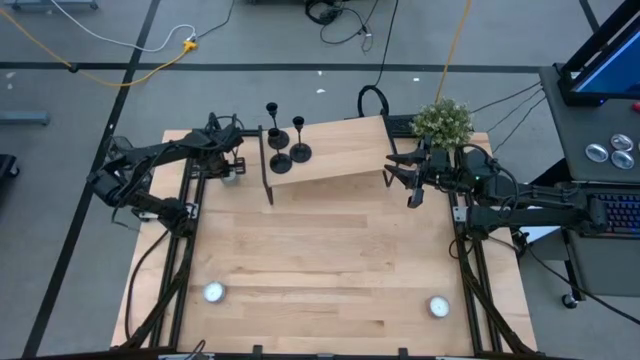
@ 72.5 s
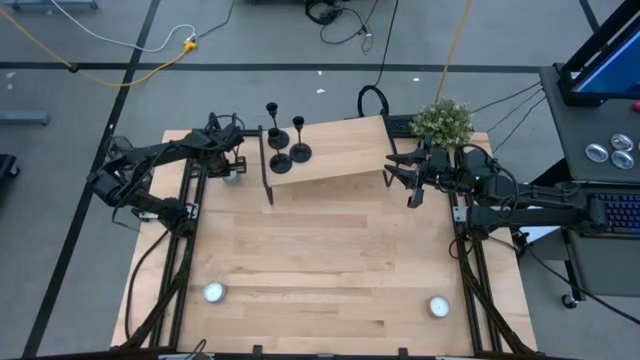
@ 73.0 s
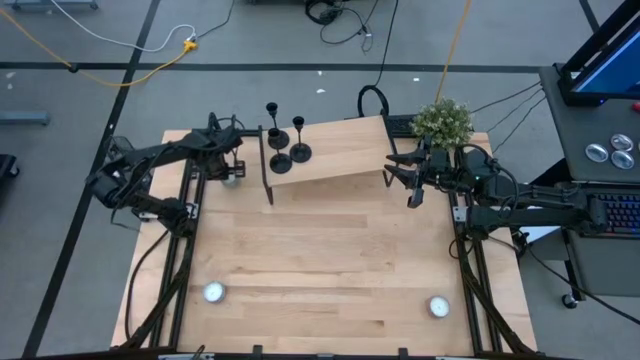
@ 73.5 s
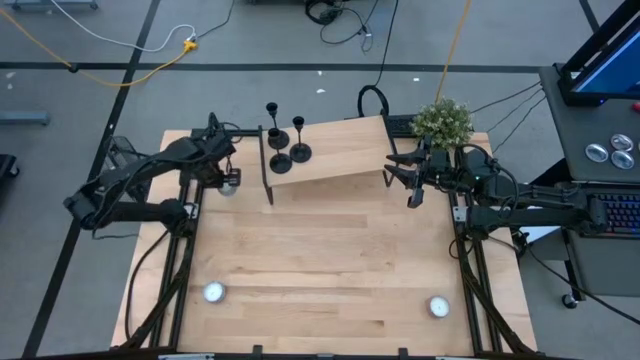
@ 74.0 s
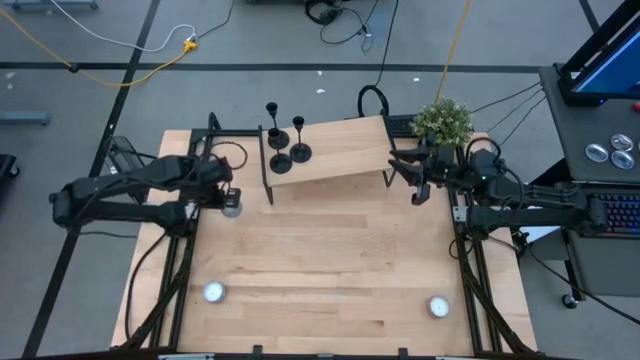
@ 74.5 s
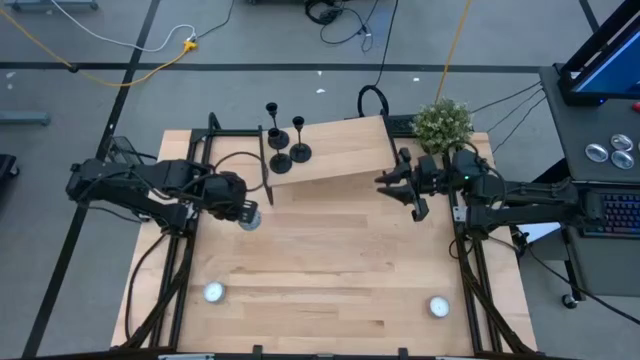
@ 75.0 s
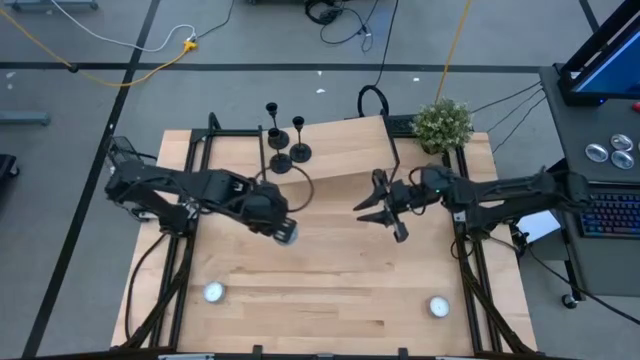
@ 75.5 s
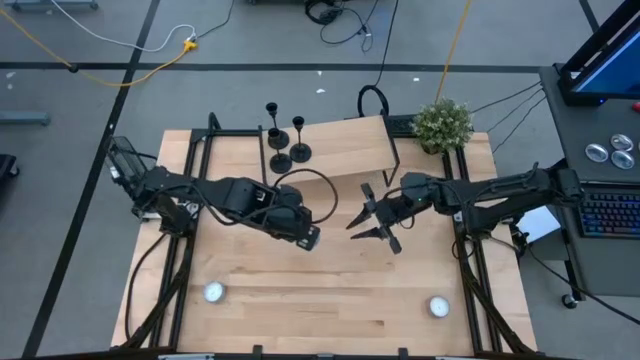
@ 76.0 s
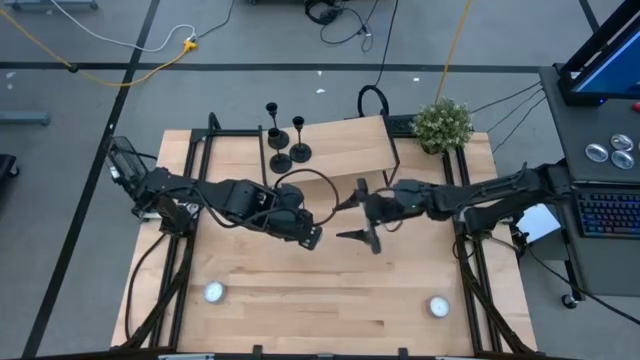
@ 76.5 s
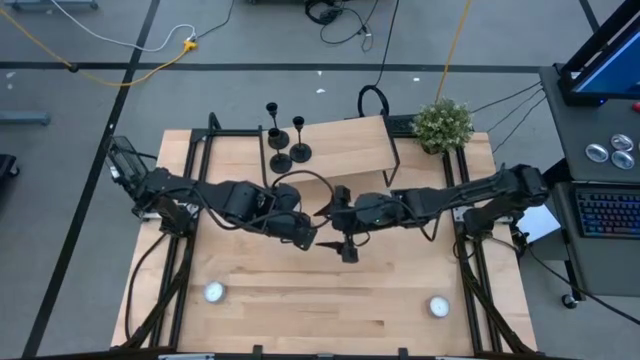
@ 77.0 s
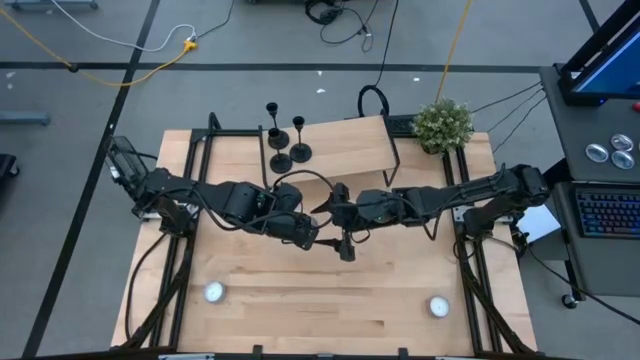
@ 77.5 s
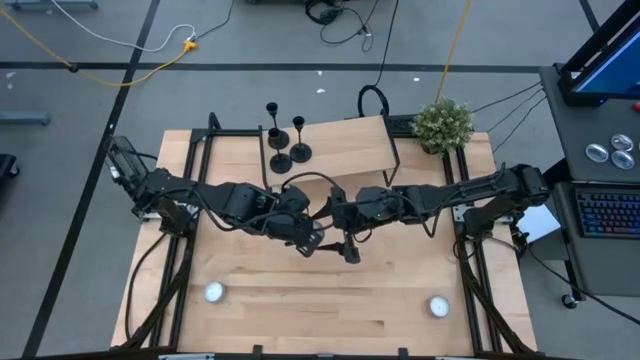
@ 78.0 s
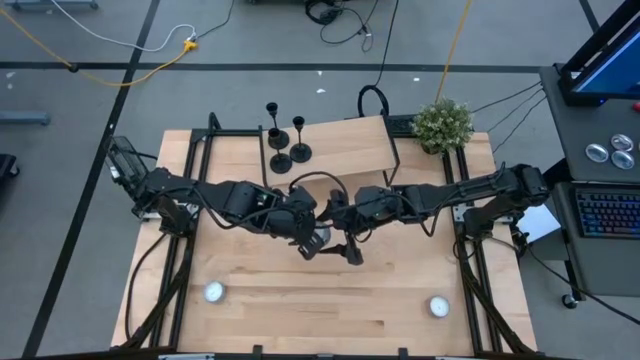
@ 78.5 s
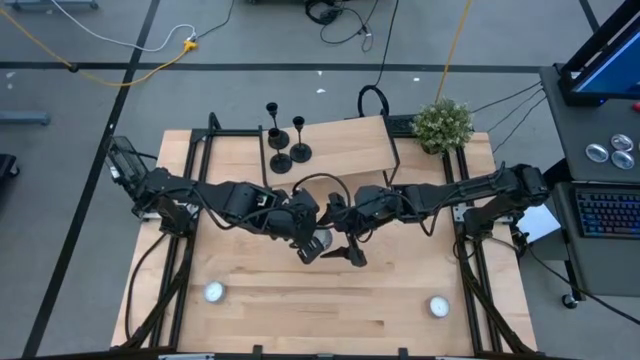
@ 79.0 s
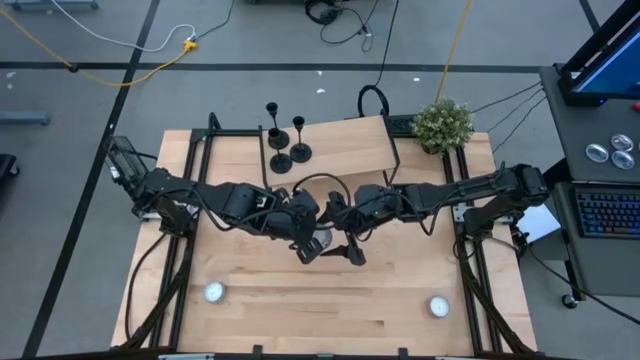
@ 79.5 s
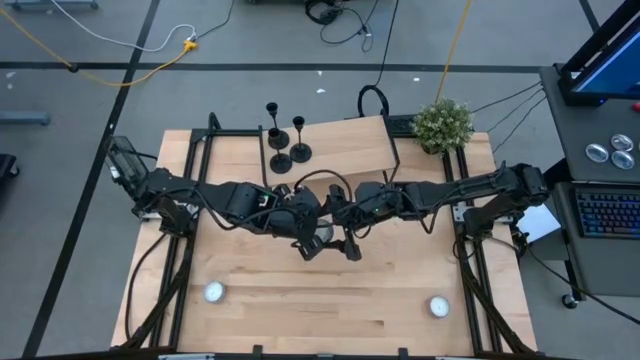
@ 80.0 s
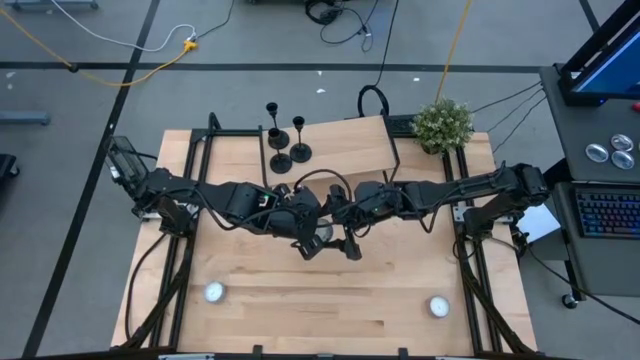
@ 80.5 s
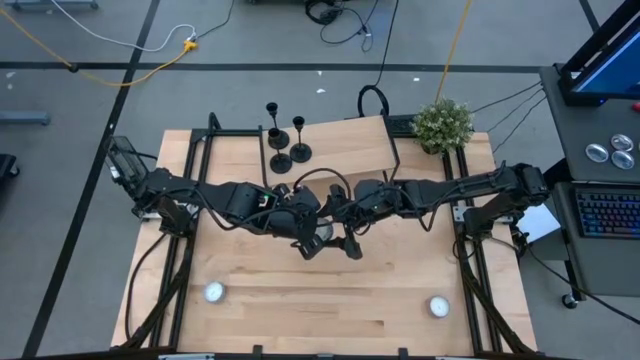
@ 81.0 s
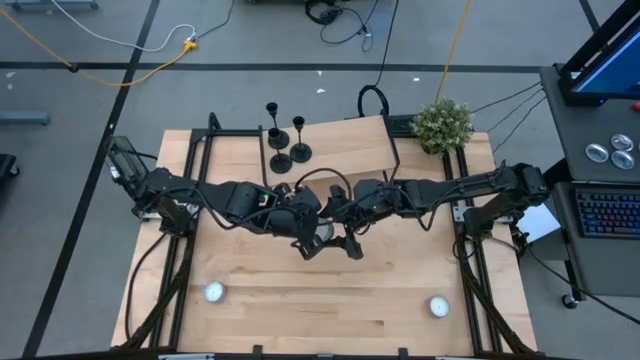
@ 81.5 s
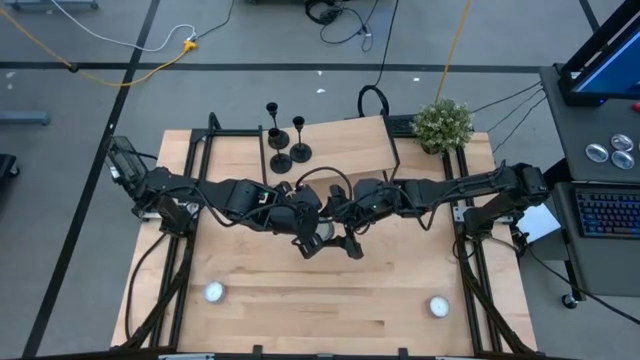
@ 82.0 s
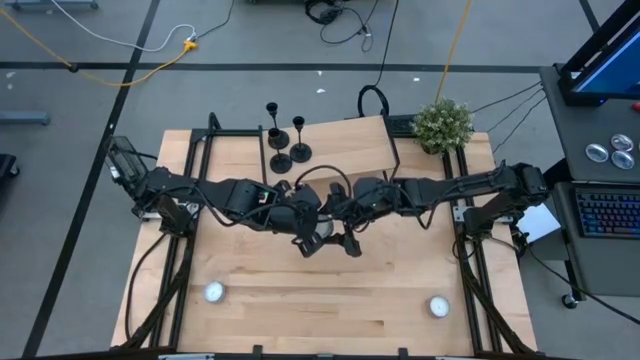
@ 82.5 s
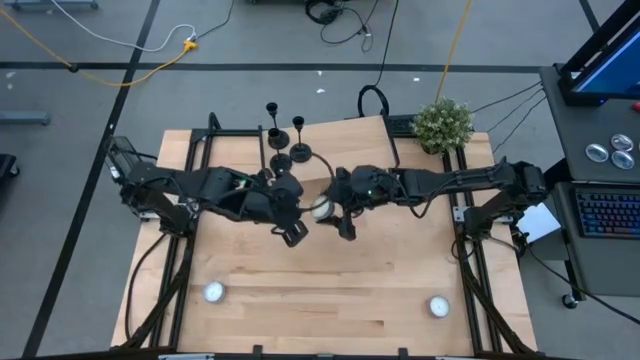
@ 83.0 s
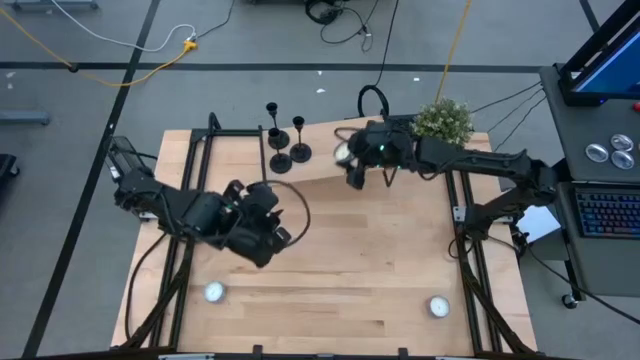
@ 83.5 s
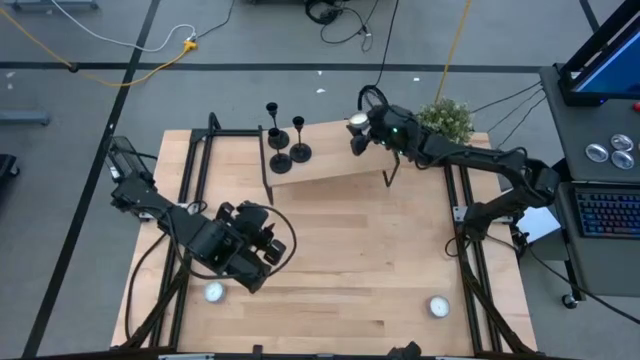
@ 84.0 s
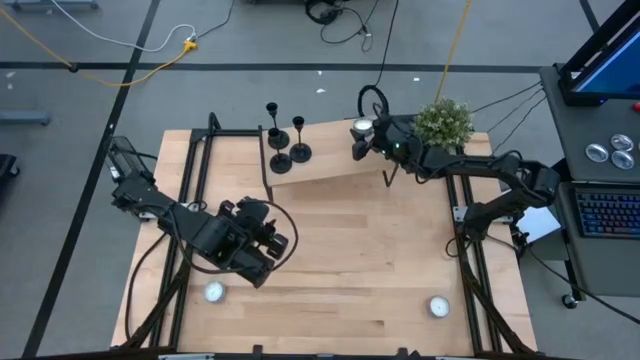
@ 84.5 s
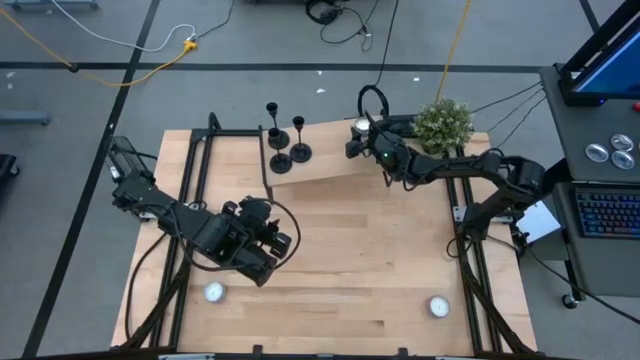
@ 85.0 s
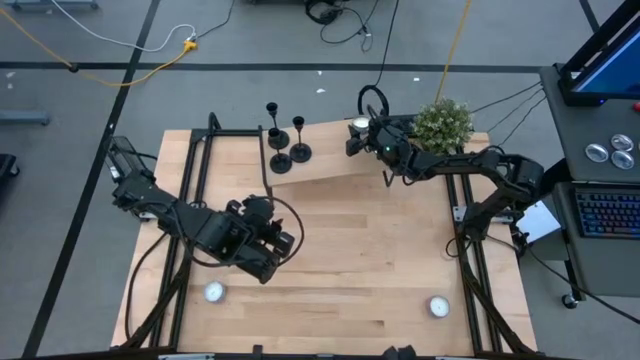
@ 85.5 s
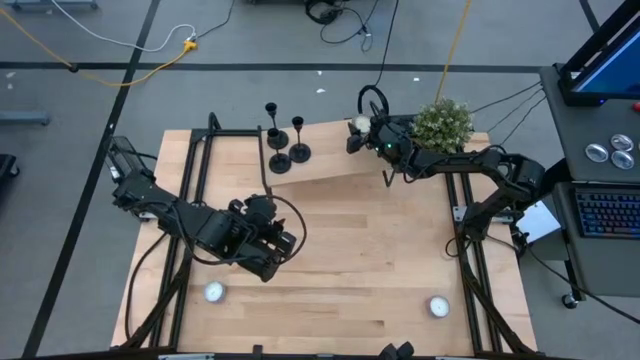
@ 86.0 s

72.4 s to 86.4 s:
Task: Pick & Place candle stick holders
Put the top blue scented candle on the shelf

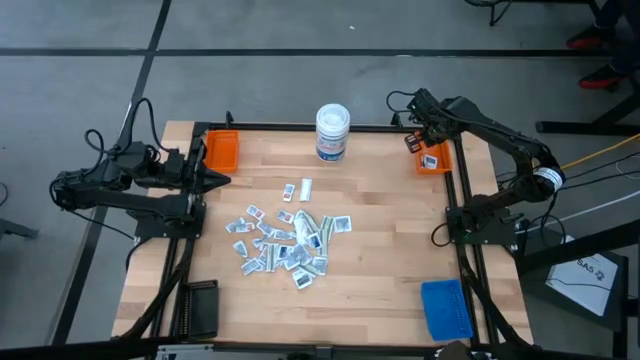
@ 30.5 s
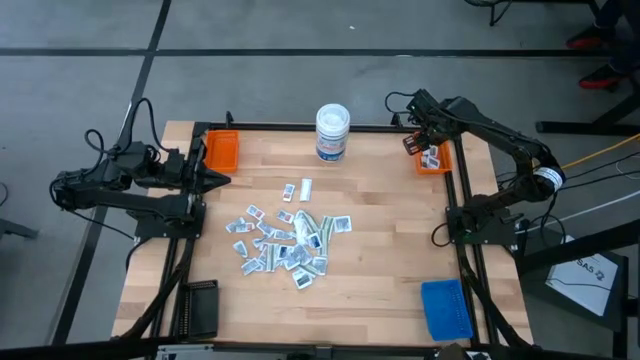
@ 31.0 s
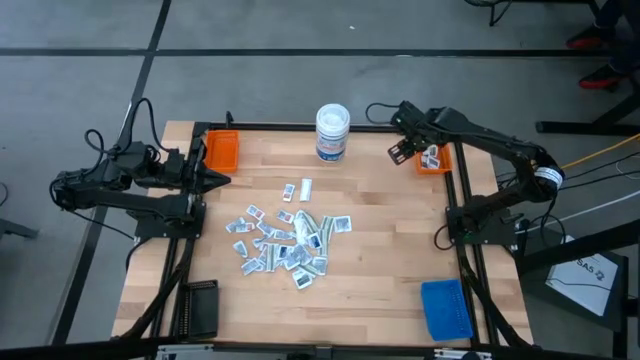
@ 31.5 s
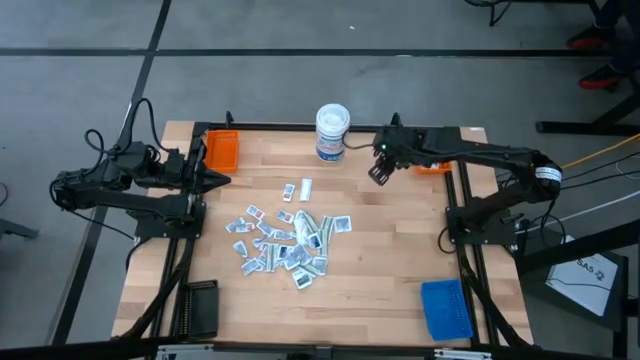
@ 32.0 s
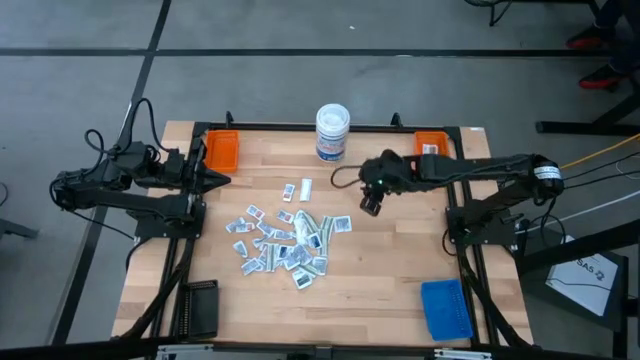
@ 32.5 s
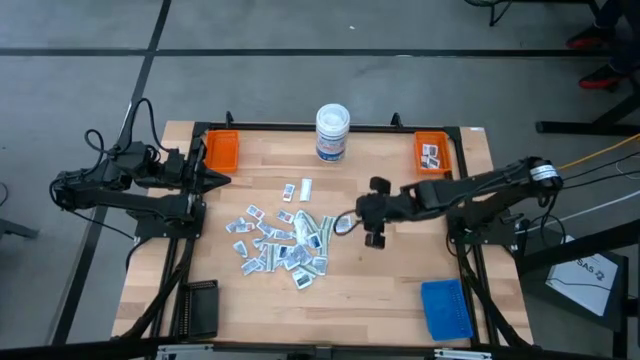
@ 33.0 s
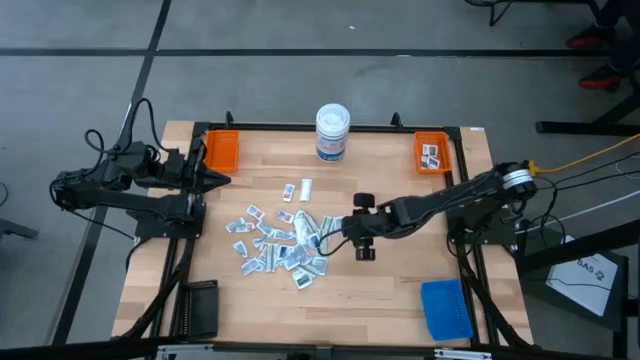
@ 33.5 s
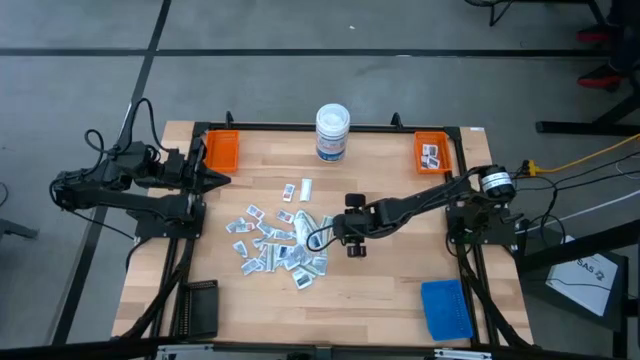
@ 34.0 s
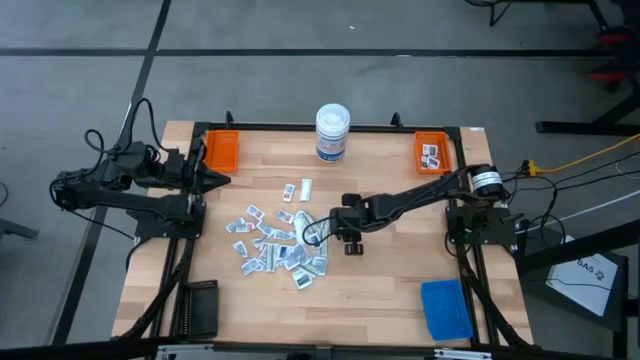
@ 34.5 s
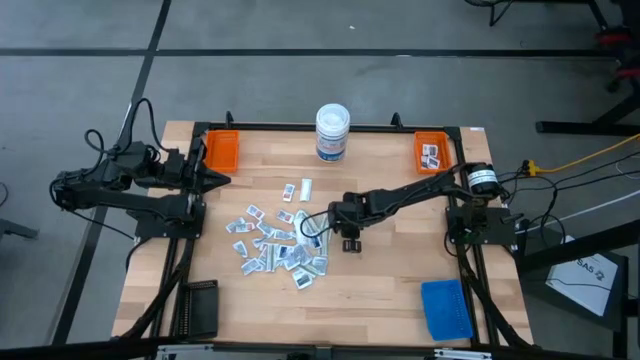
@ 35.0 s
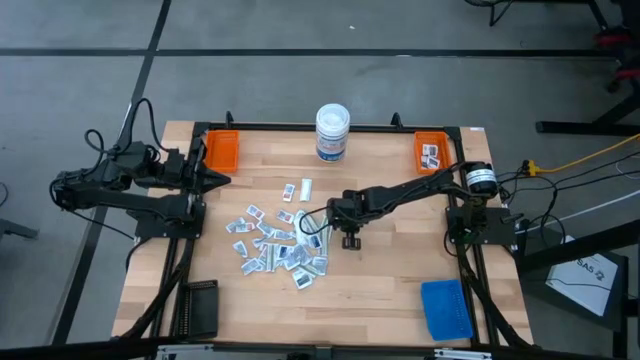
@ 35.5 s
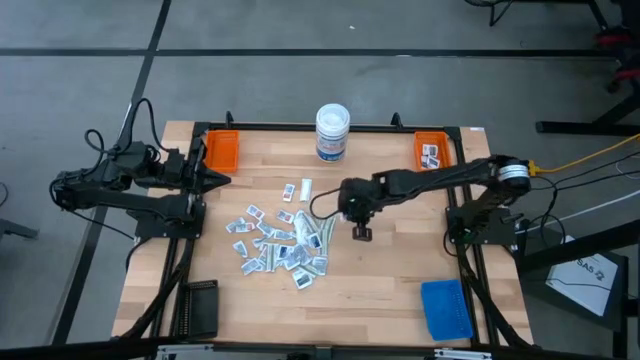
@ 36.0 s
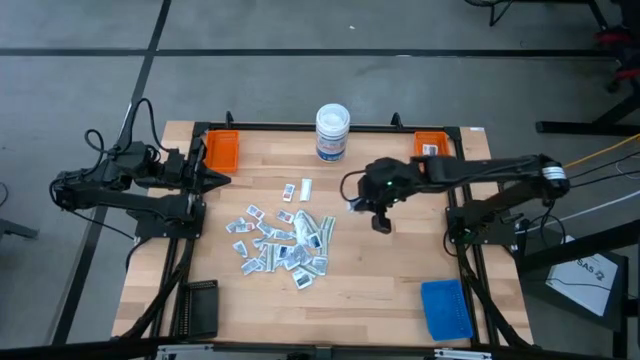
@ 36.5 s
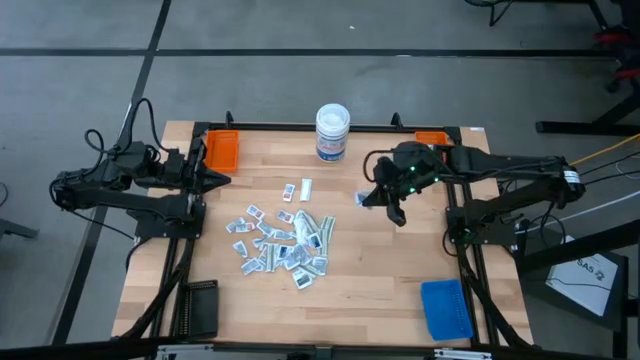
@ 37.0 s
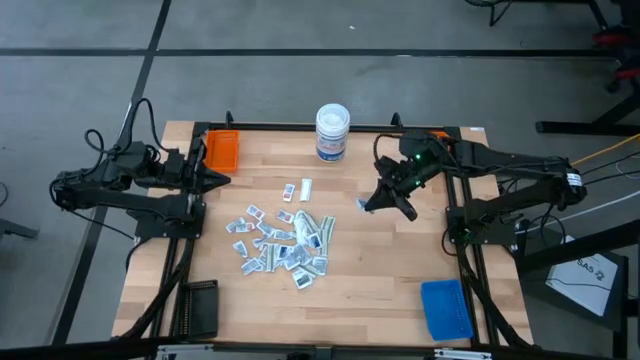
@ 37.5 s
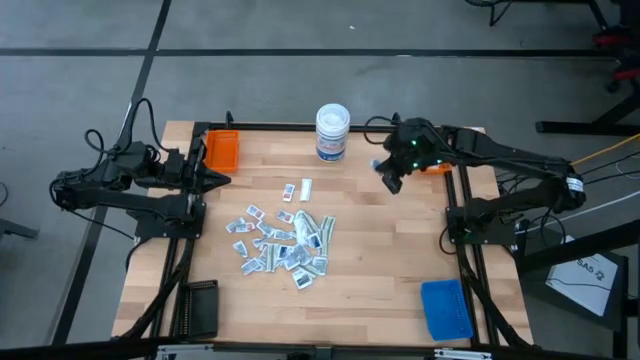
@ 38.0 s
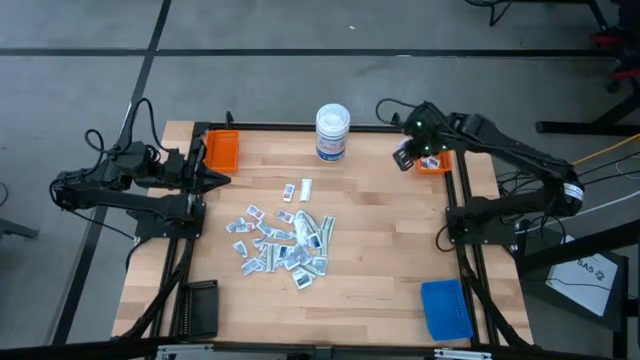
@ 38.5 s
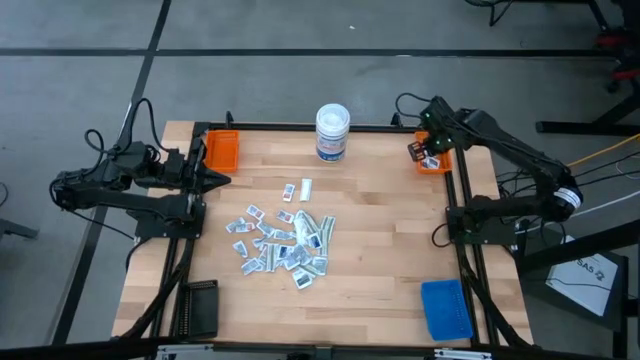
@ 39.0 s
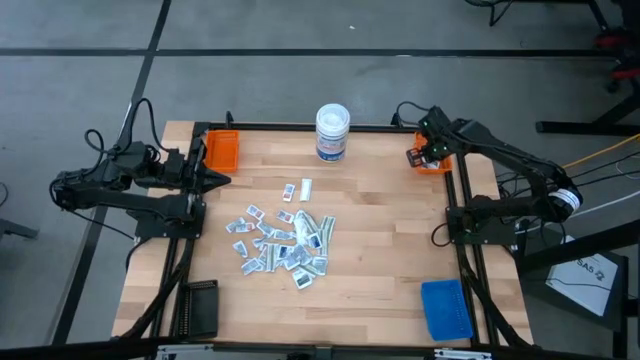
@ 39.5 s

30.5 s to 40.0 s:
Task: Pick & Place First Aid Supplies
Put the gray towelette pack into the right orange bin
